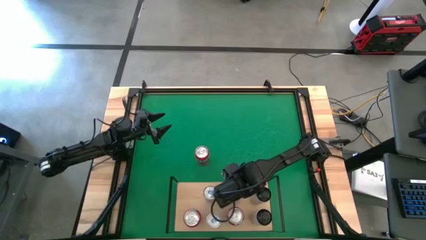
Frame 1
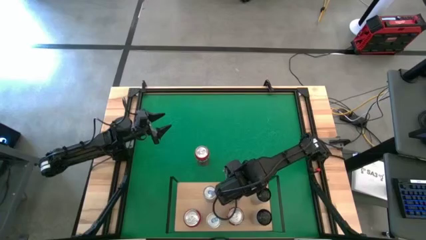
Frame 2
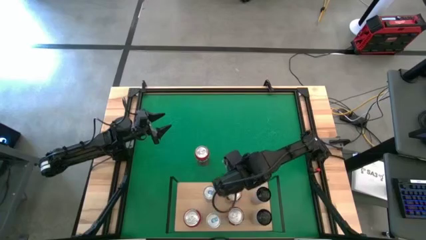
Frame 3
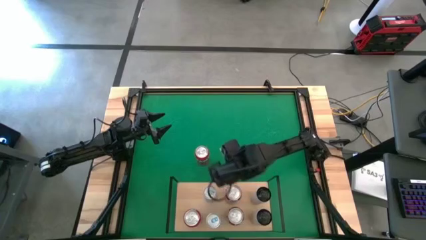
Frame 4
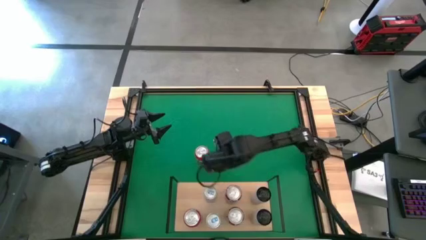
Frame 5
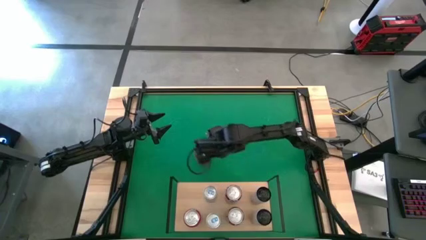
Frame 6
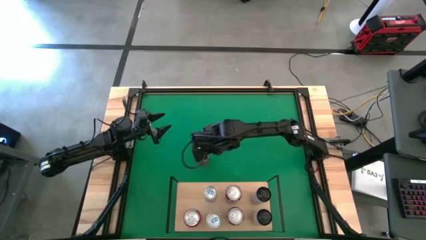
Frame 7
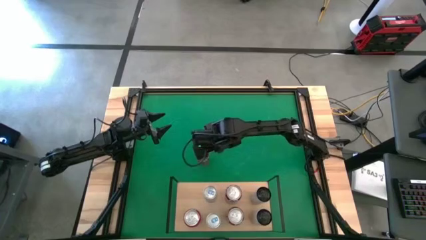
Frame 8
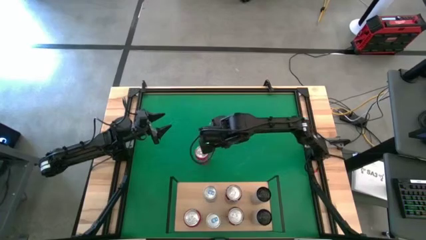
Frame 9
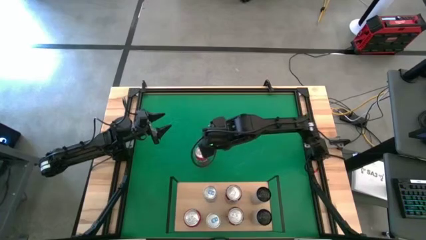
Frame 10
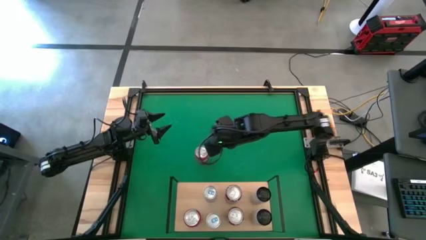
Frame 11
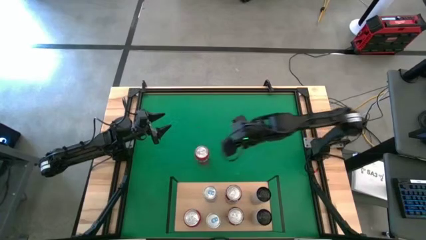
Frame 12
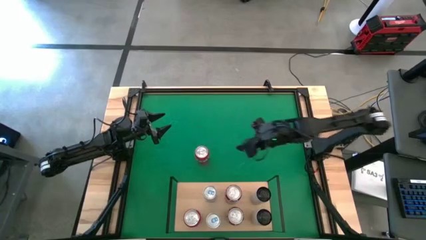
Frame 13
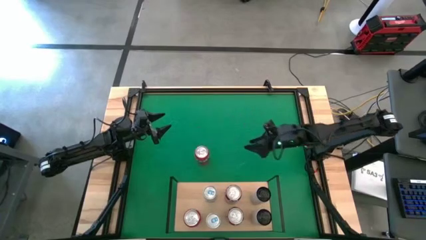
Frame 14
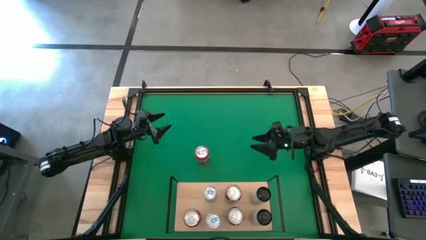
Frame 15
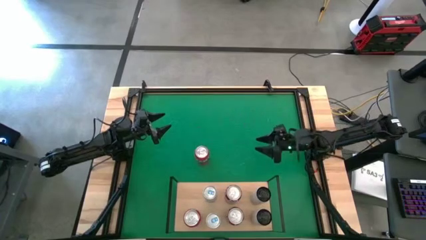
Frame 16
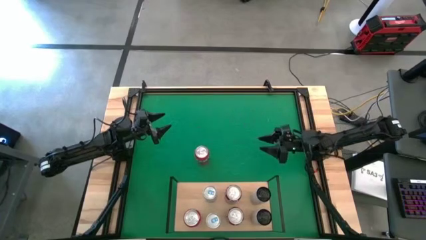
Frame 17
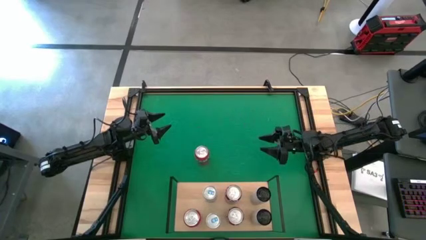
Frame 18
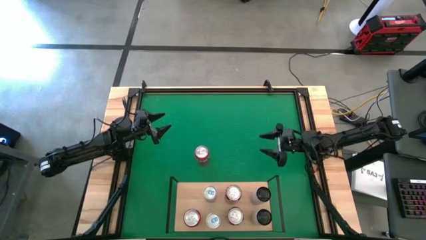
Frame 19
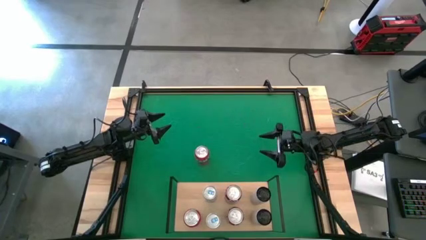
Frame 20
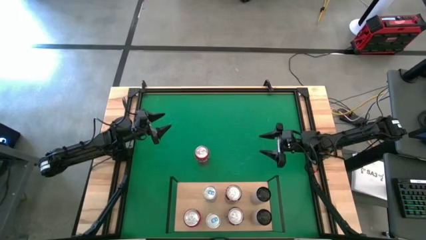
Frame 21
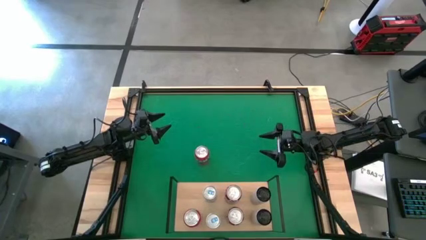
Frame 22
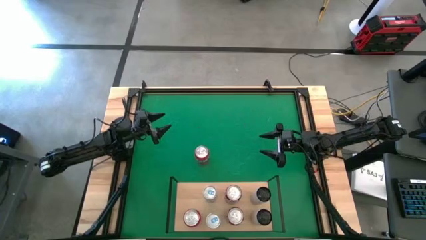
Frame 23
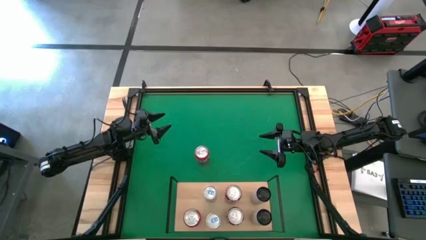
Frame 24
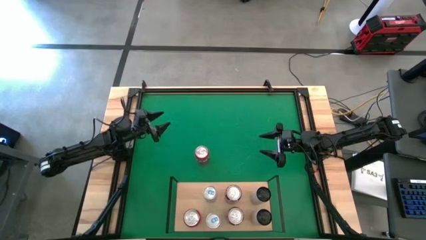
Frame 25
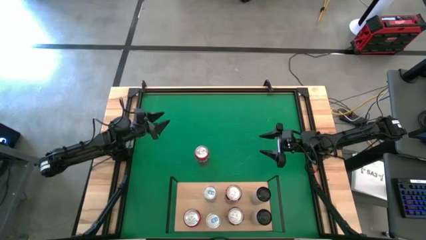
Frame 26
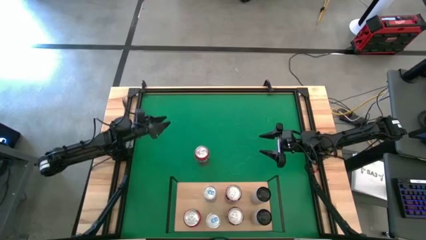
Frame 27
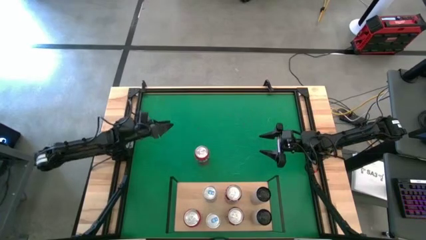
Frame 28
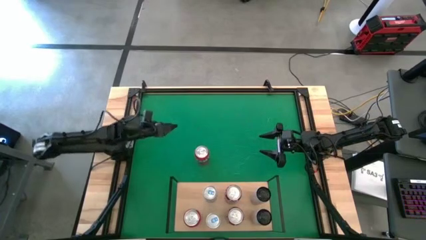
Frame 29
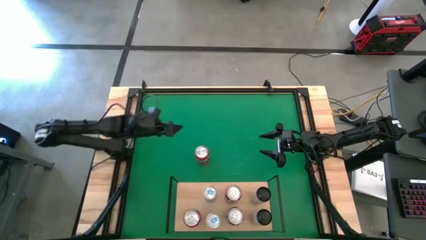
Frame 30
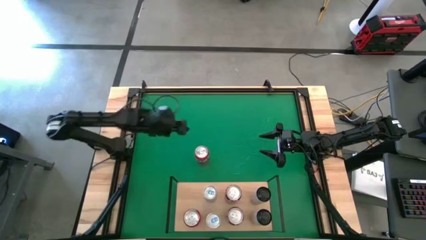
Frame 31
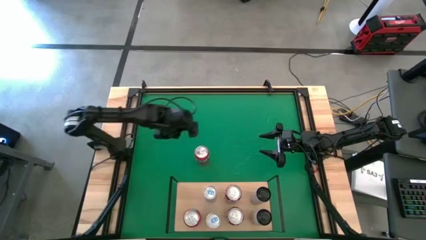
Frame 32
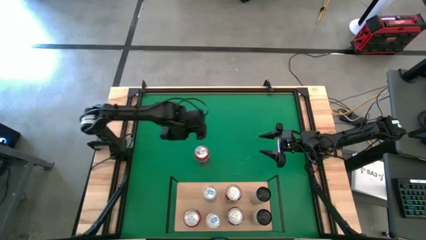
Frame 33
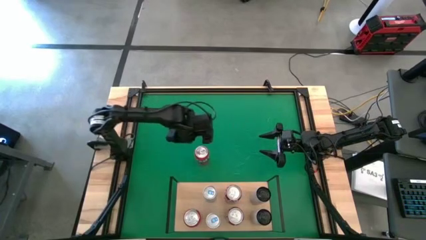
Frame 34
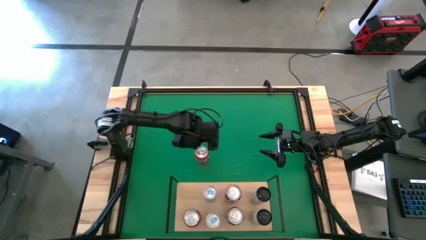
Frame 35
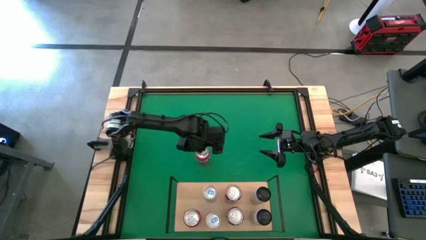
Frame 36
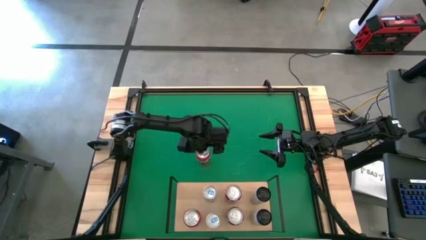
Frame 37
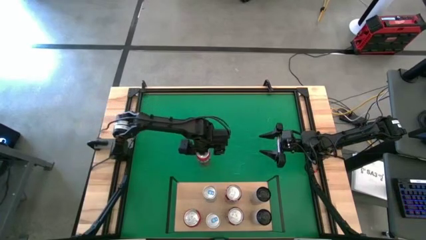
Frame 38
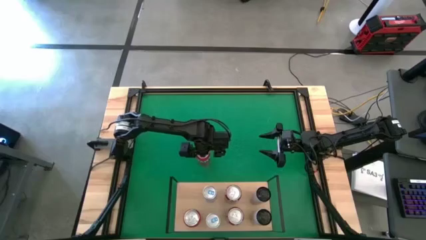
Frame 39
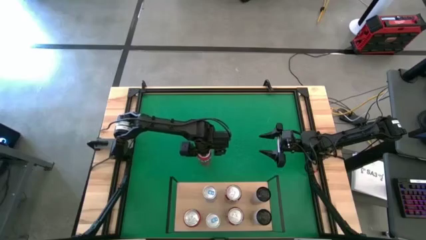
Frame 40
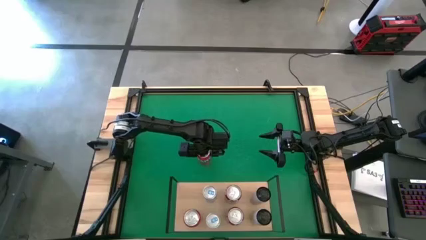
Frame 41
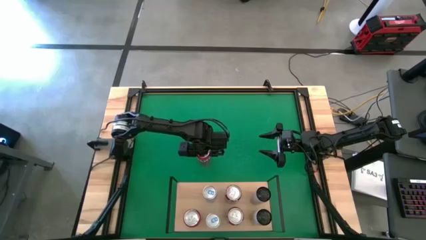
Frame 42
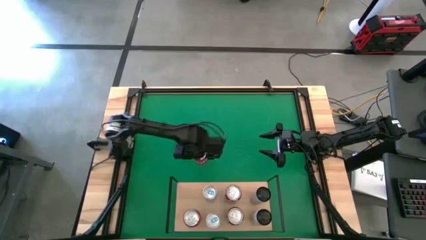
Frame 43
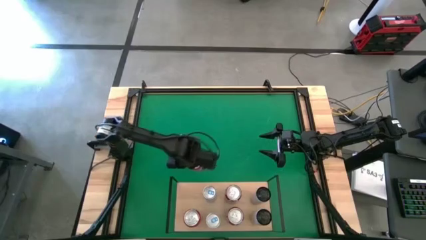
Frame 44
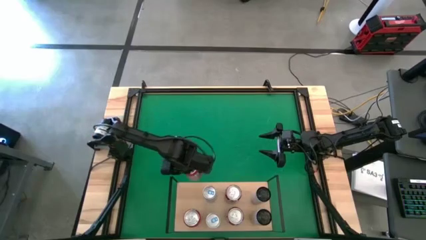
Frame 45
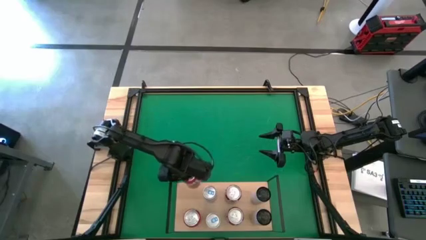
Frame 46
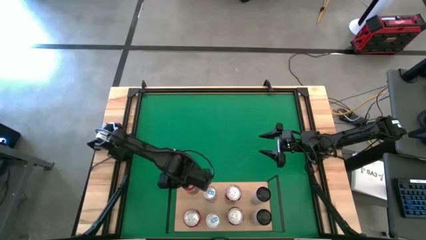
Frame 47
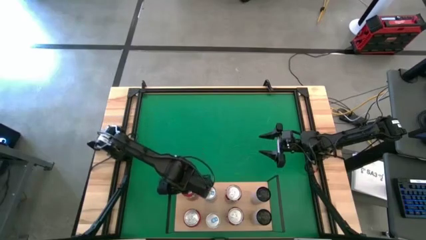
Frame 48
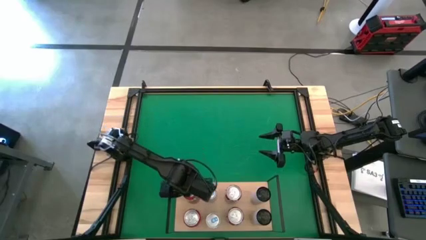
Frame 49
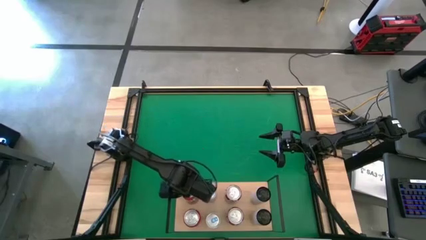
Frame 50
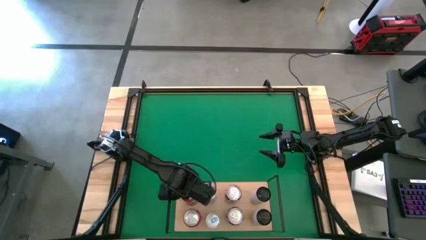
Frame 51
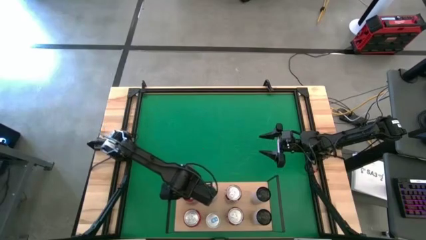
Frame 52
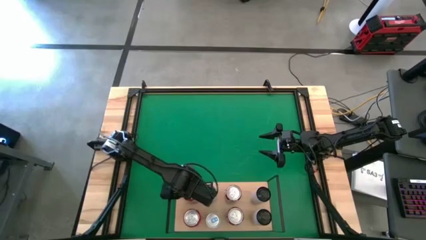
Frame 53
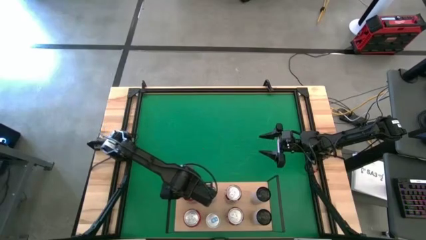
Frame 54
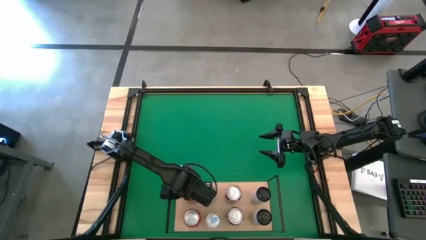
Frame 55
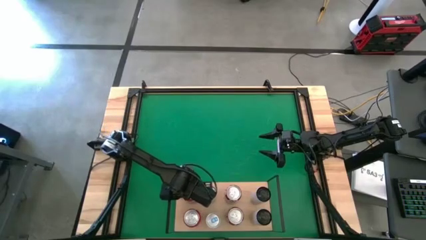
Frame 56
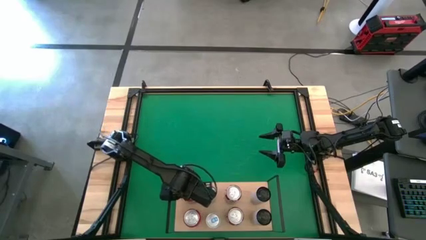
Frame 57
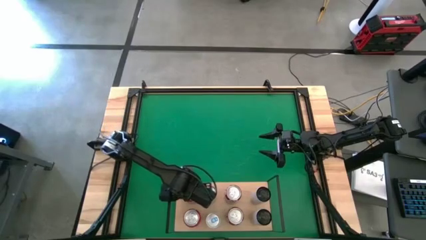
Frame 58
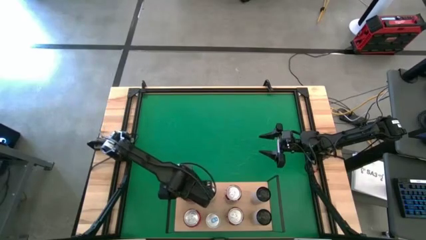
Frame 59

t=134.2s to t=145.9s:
Task: Place canned beverage on shelf
Put the orange soda can aligned with the other orange soda can on the shelf

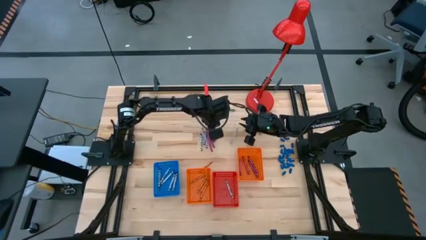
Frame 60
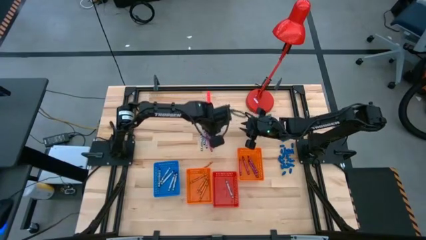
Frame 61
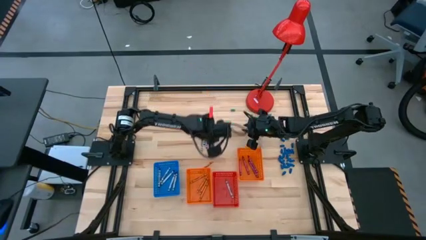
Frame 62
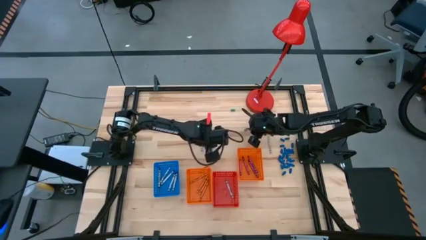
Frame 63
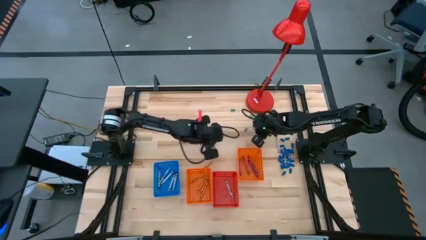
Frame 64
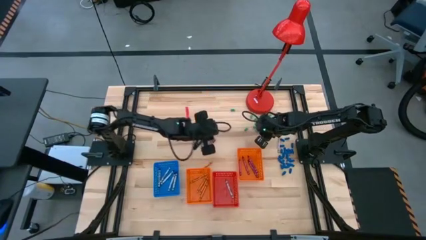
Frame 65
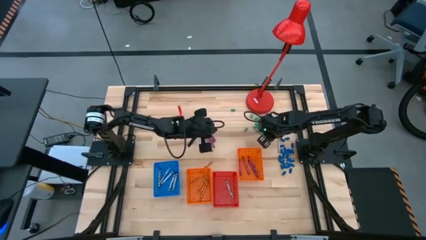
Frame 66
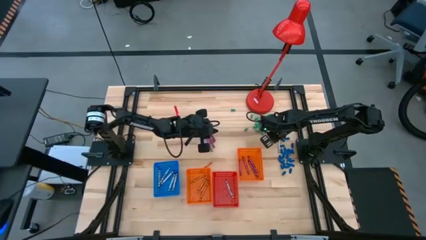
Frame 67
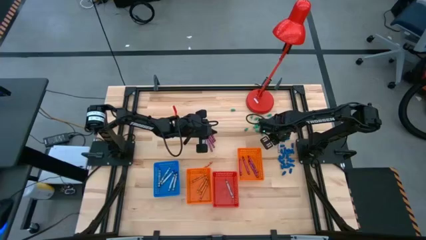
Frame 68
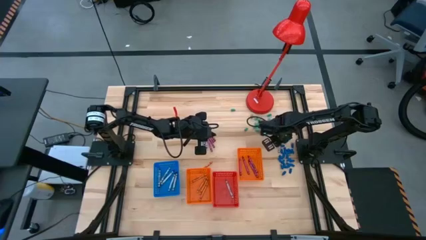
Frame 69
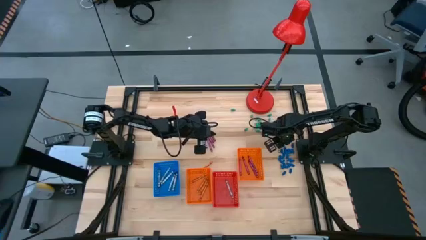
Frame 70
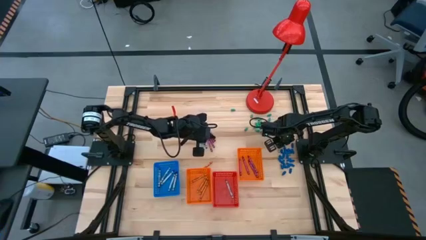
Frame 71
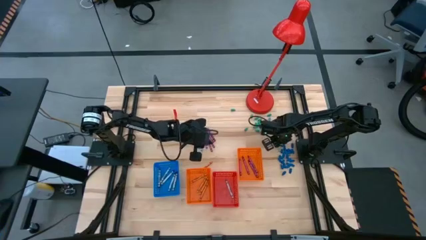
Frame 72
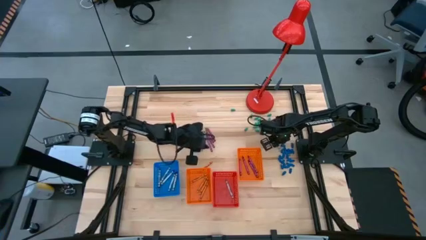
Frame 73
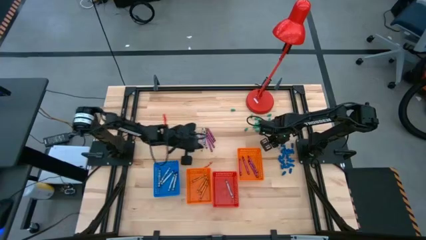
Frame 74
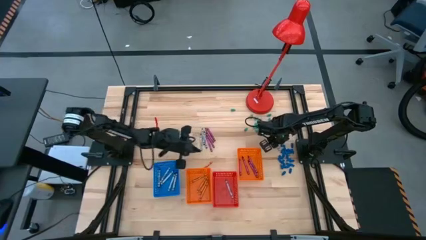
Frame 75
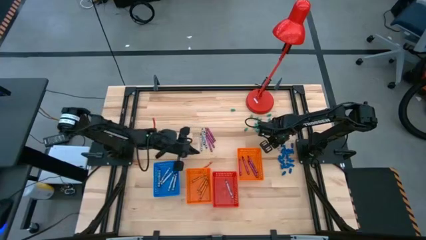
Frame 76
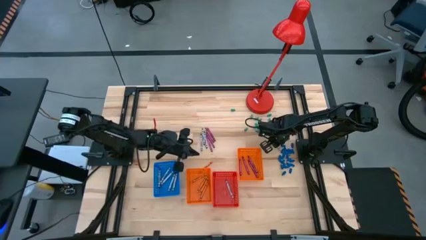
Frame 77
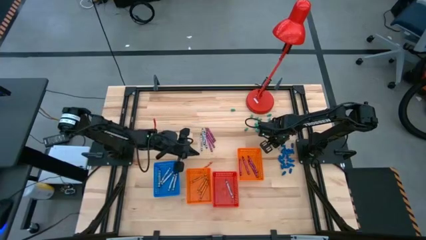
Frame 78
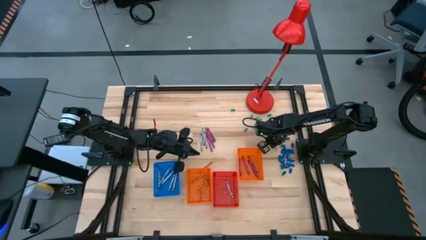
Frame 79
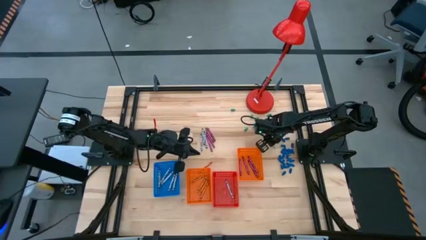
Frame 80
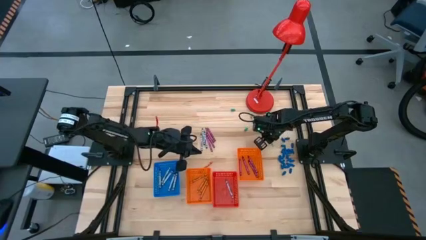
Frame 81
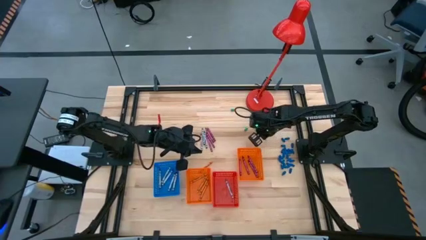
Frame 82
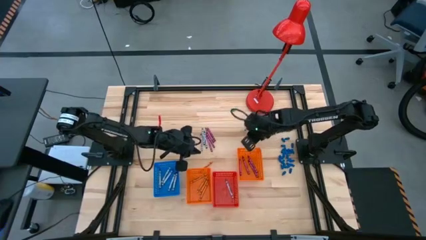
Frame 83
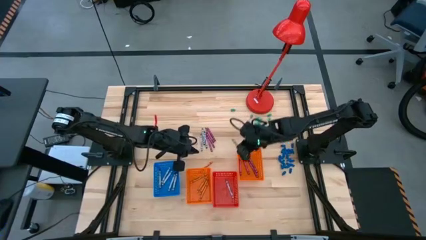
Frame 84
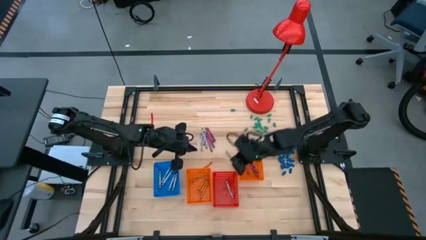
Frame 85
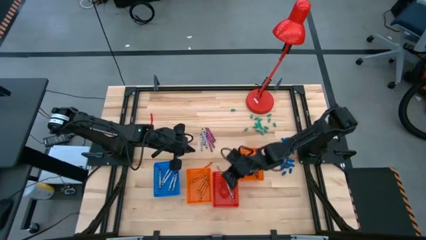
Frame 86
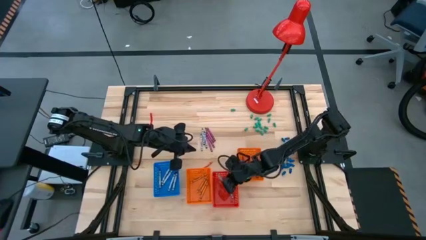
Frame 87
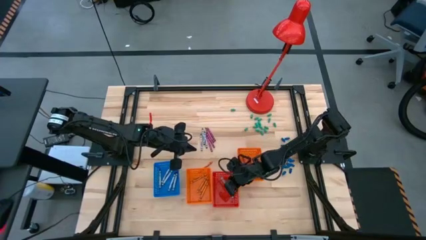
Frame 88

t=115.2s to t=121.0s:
Task: Sort crayons
Put the gray crayon into the red bin
